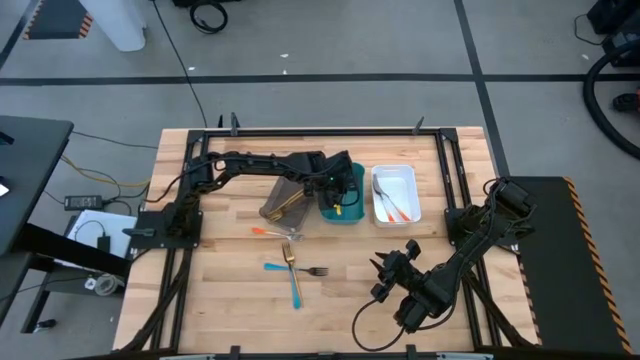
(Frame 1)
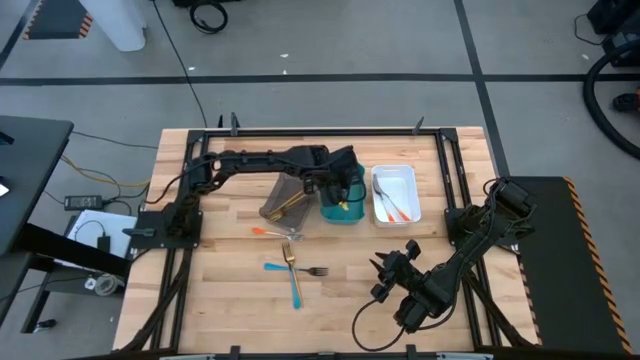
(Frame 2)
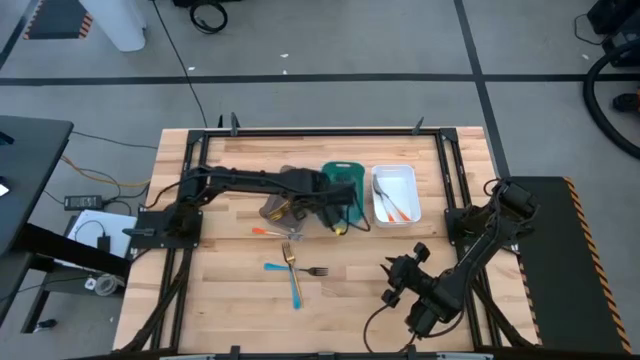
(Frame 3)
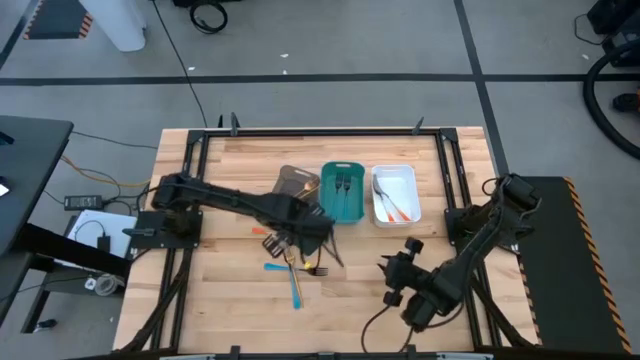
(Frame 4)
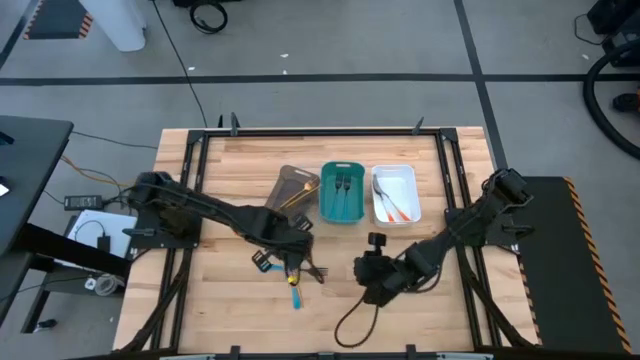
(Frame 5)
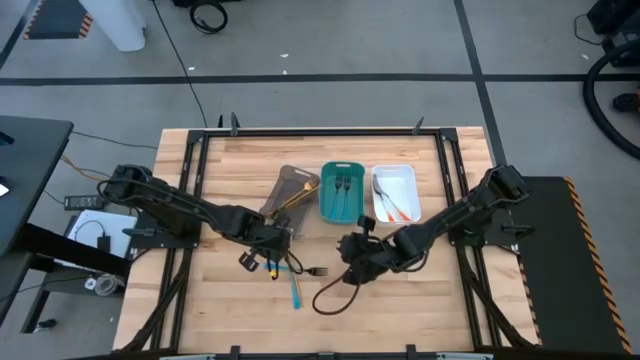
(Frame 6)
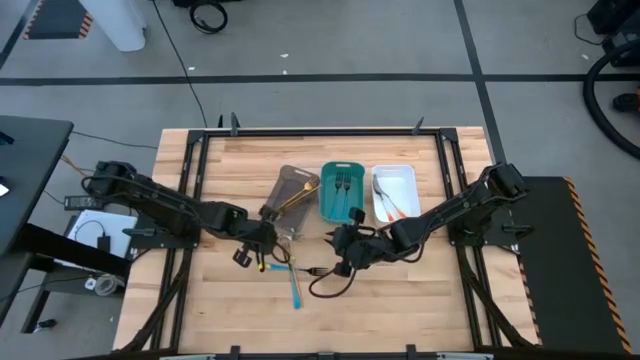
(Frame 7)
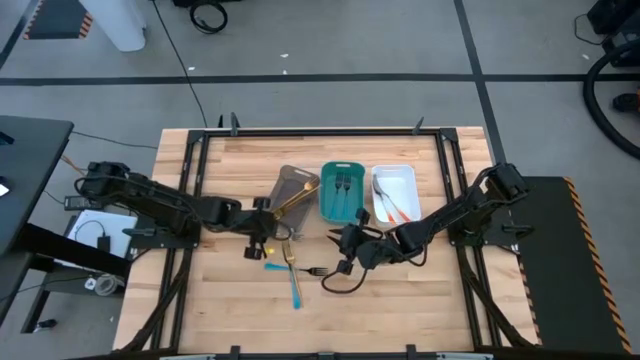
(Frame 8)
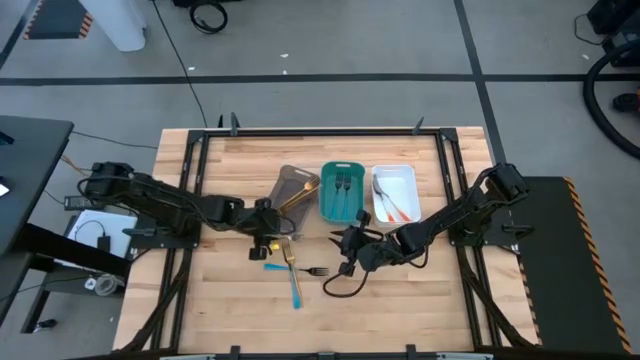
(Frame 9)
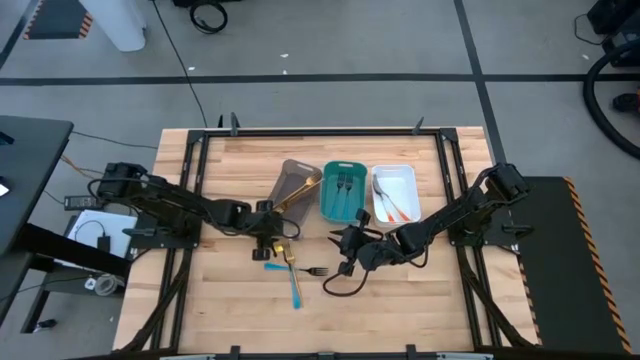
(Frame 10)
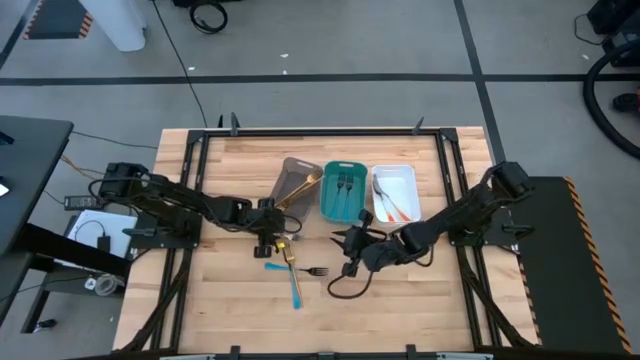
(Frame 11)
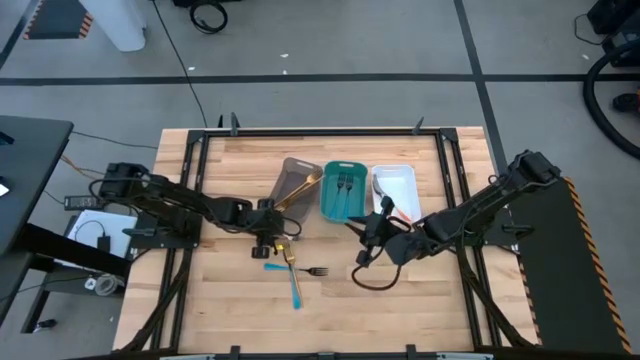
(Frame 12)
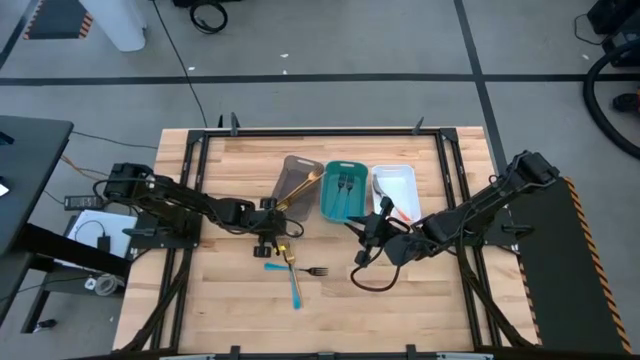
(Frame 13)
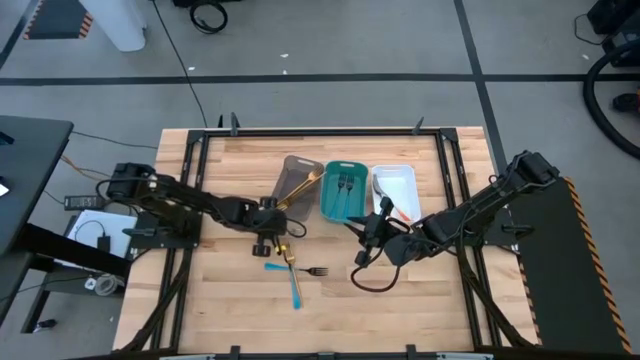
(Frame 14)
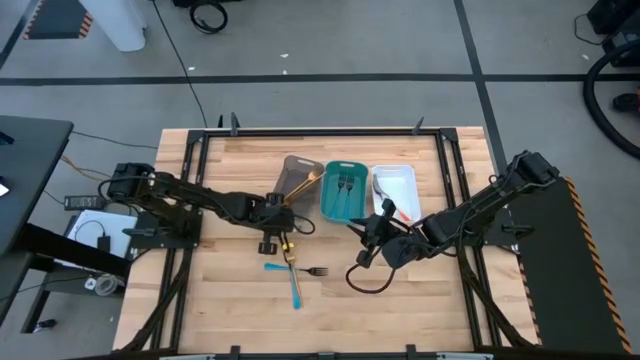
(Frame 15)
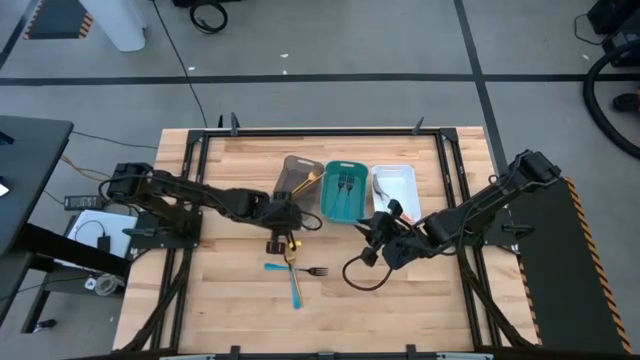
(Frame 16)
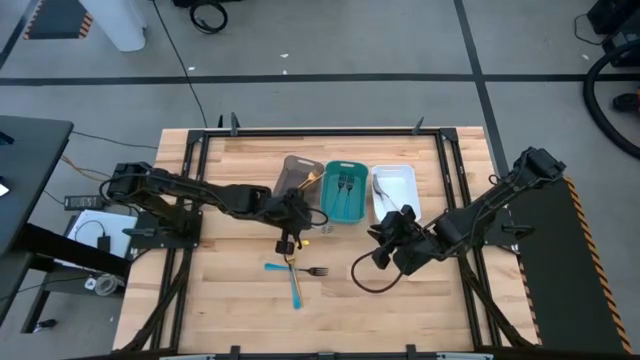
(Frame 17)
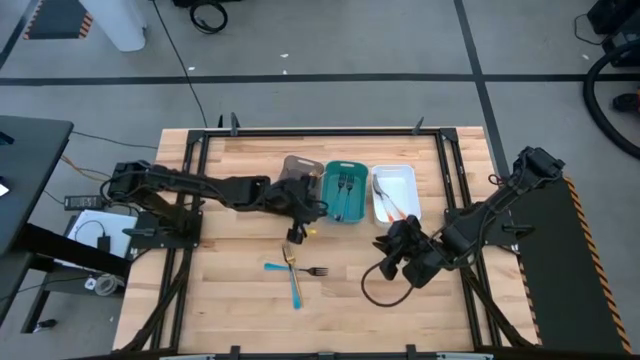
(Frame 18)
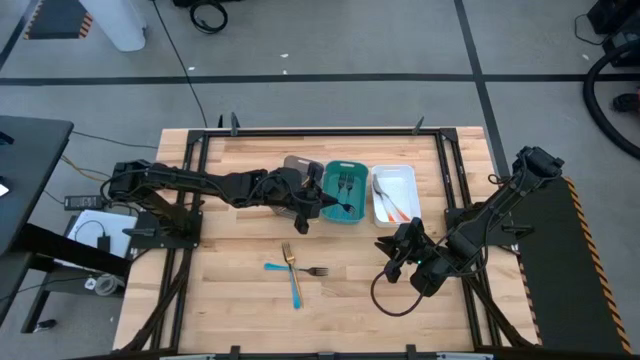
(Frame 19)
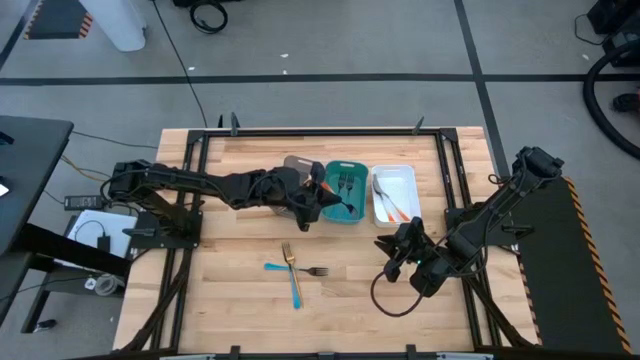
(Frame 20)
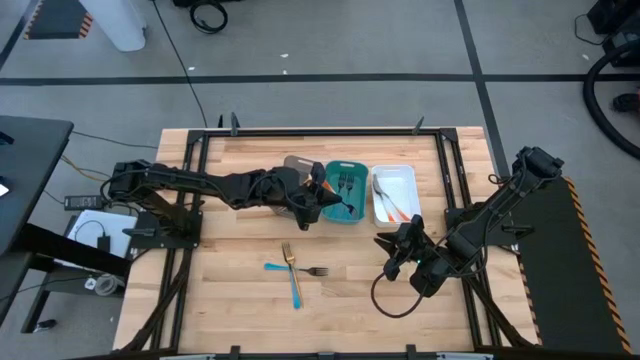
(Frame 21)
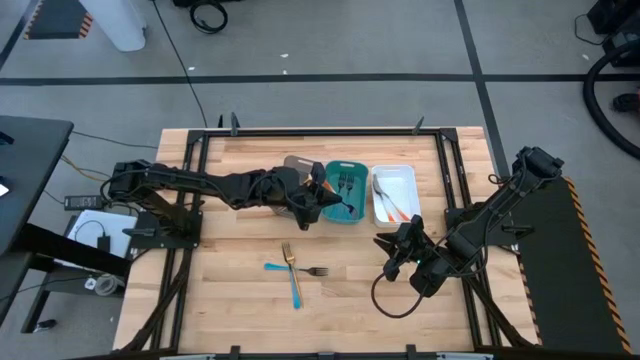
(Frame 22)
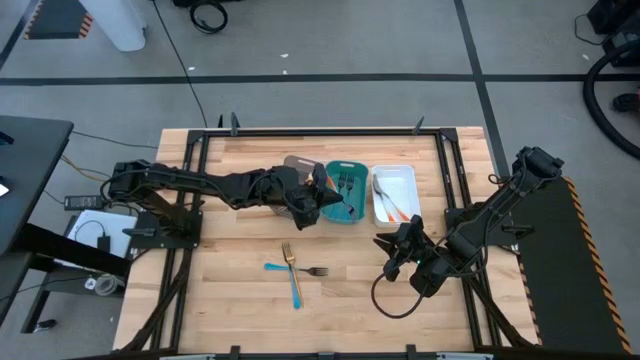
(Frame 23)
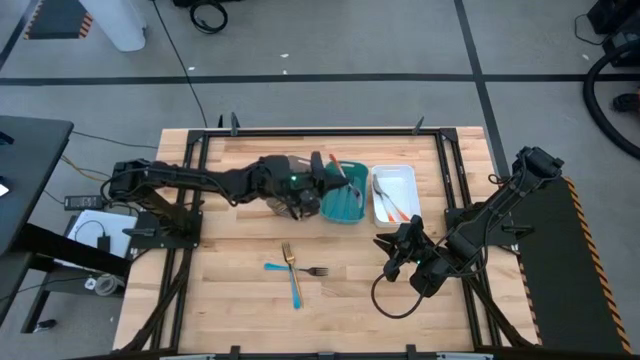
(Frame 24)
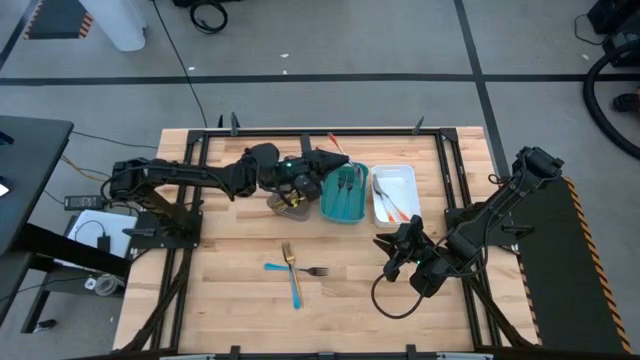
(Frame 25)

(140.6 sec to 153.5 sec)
Task: Sort silverware by color (type)
Put the orange fork into the white bin

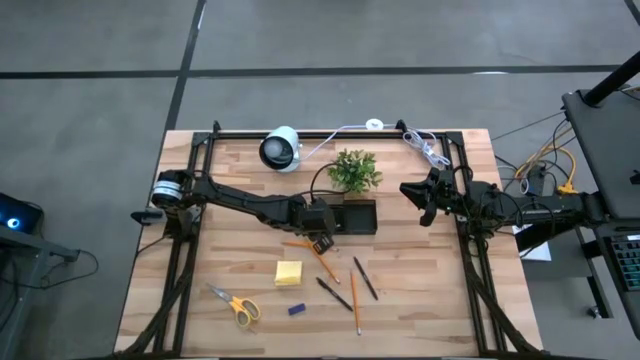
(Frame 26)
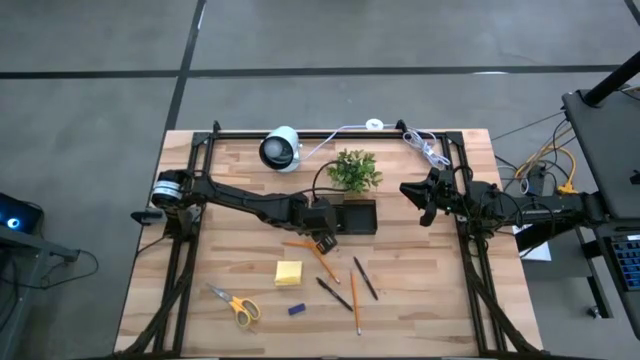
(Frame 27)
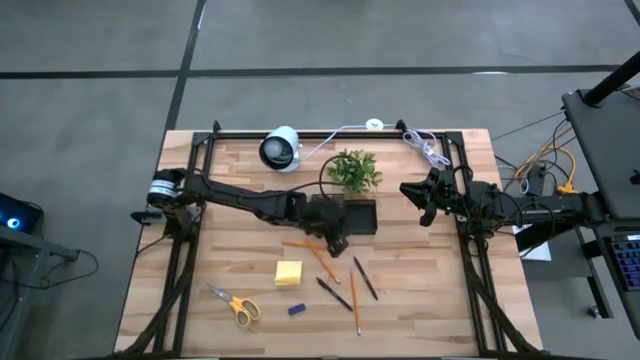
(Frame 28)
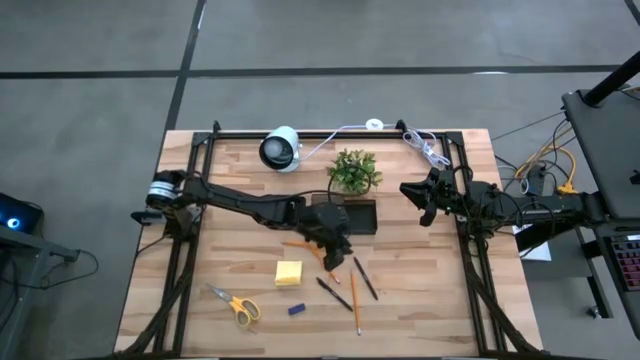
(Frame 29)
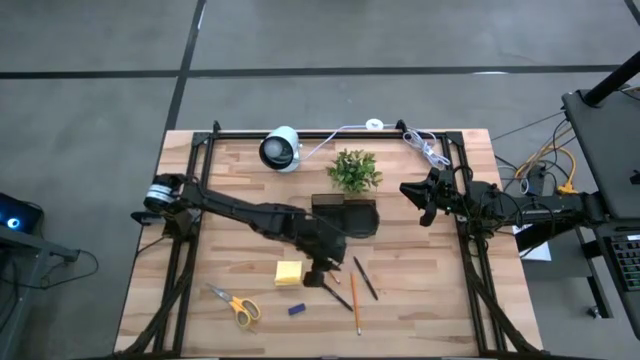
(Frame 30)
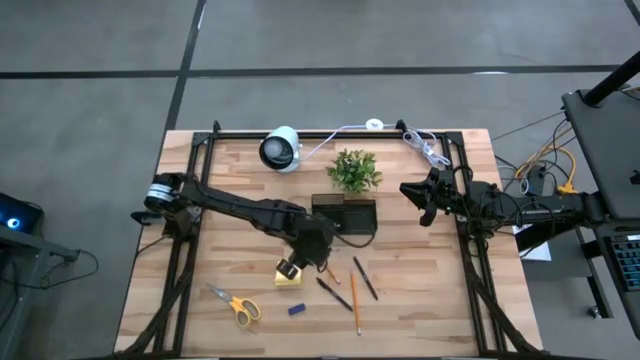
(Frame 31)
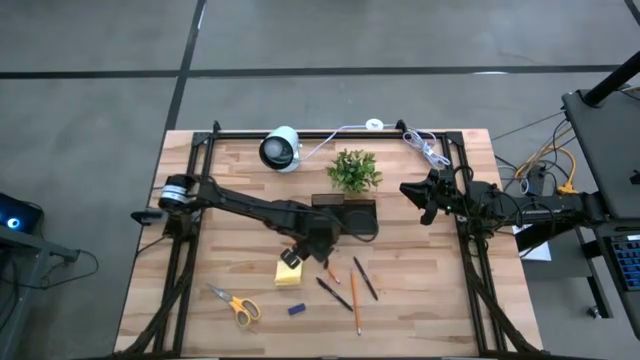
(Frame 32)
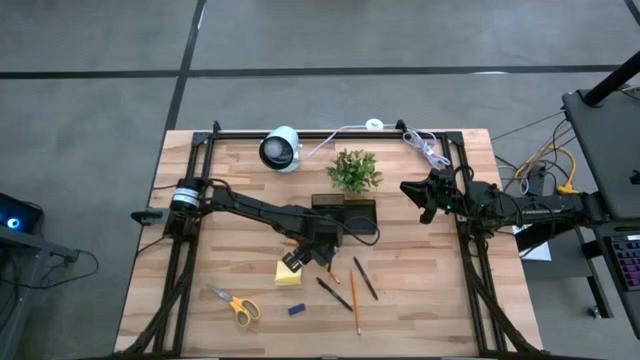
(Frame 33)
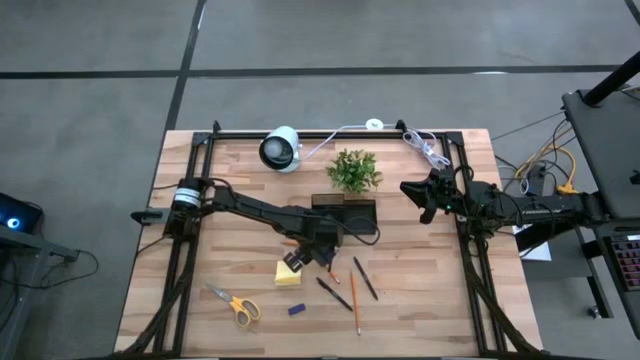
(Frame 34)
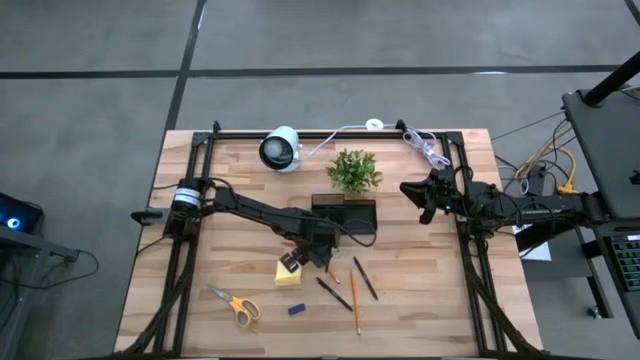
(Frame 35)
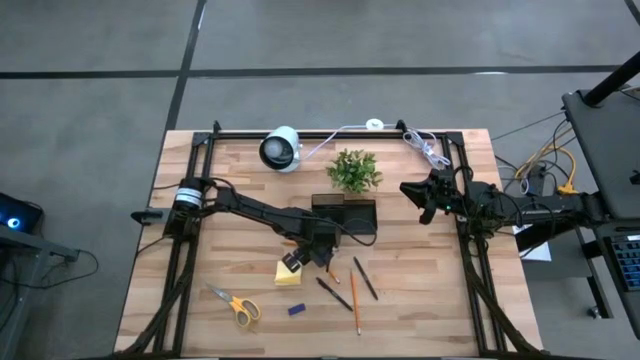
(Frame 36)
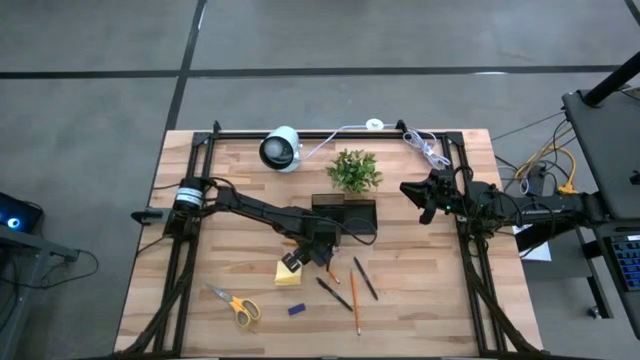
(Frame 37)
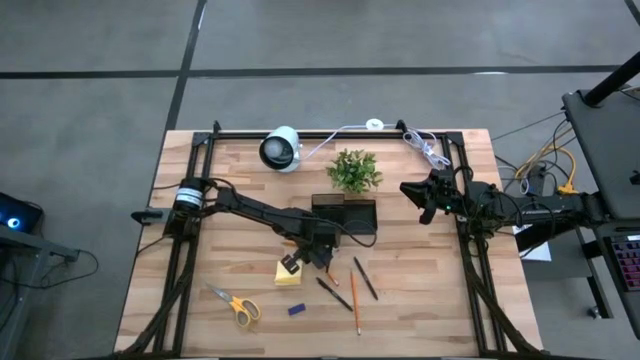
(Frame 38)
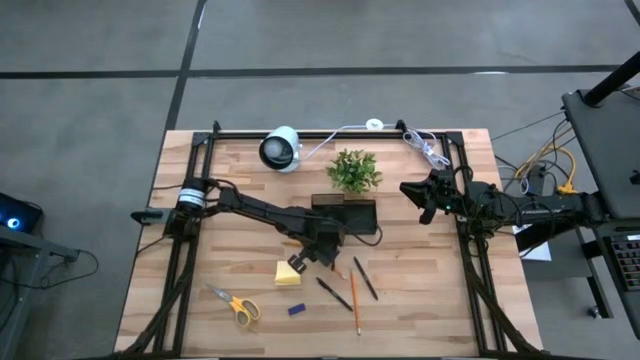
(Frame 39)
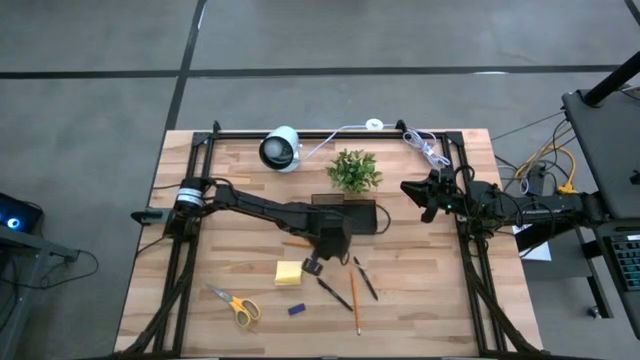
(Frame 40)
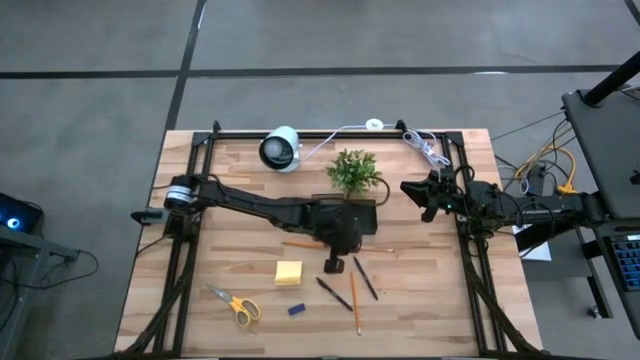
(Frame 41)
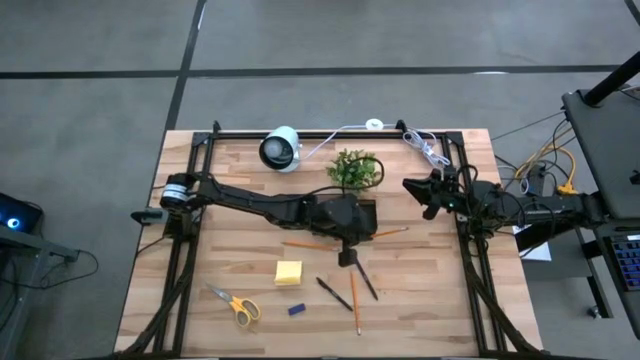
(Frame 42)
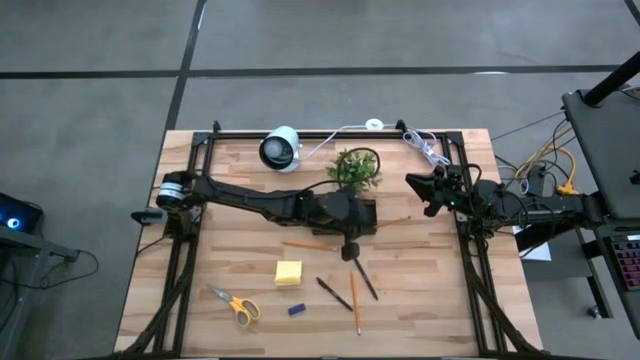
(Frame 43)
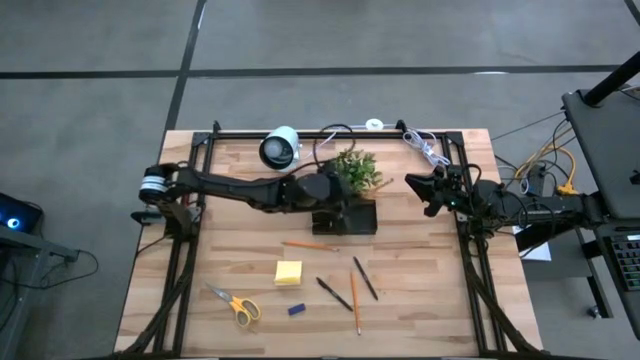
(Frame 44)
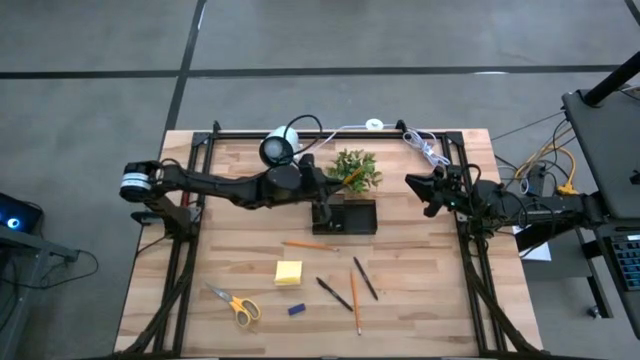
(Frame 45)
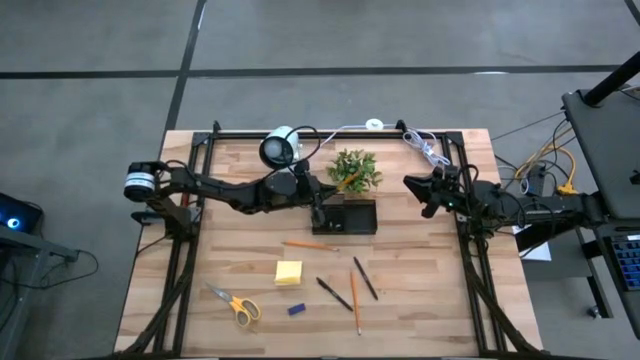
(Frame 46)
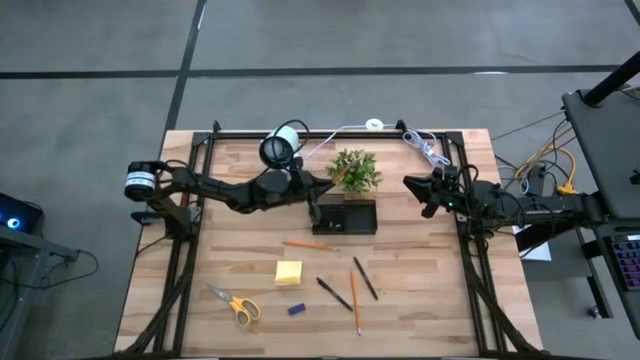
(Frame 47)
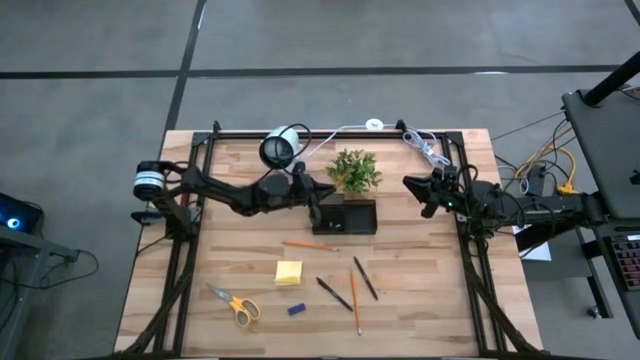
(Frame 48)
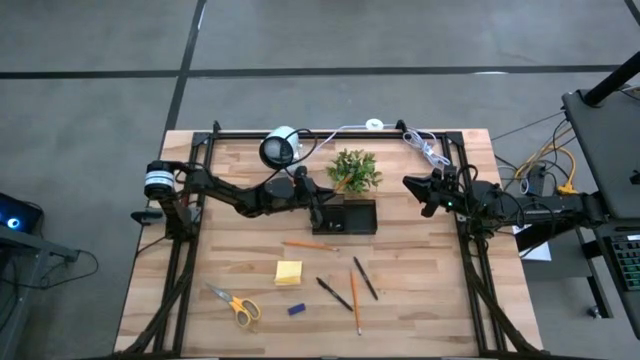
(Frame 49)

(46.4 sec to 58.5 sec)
Task: Pick and place office supplies into organizer
Put the middle orange pencil into the black desk organizer
